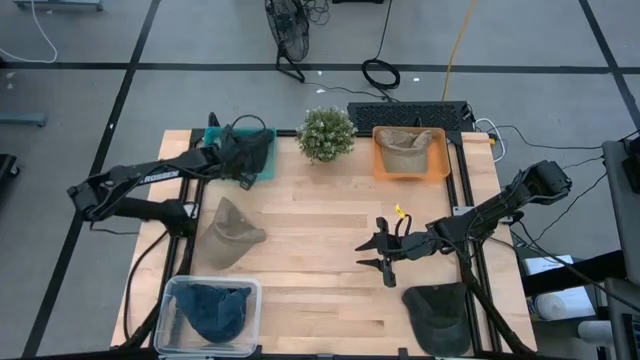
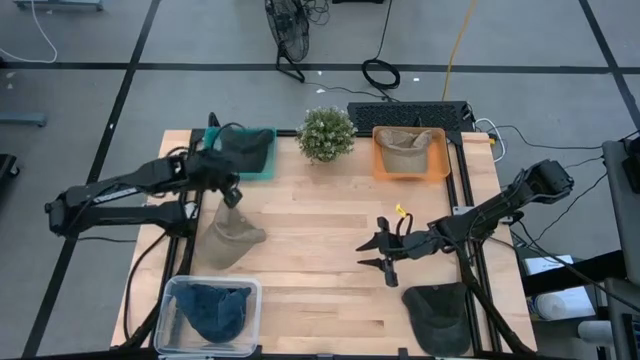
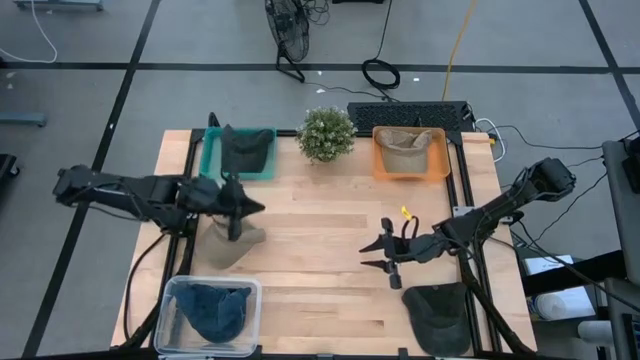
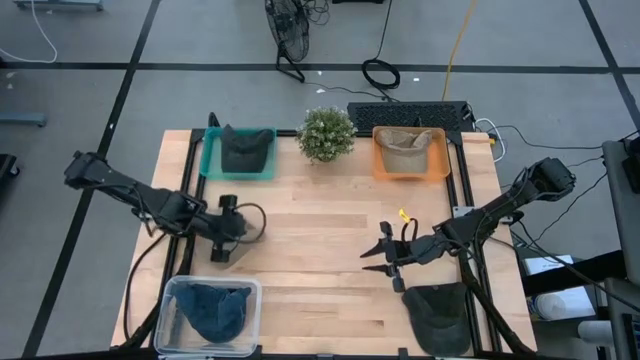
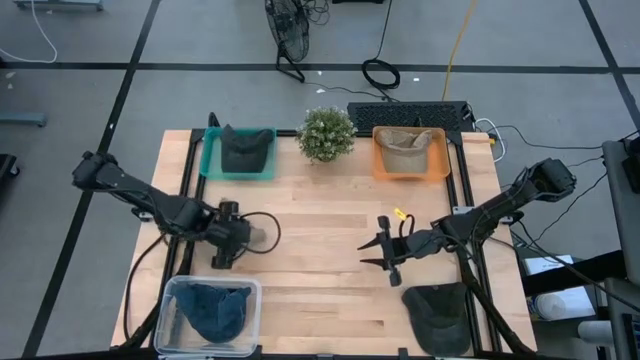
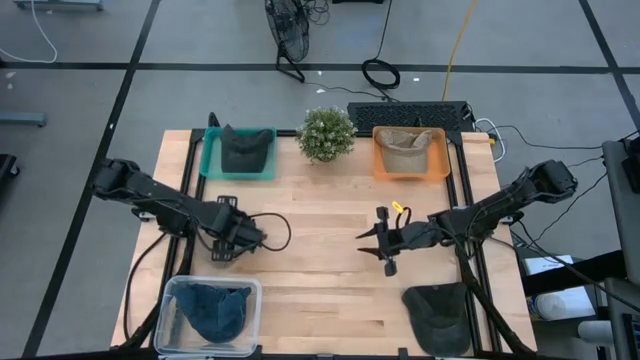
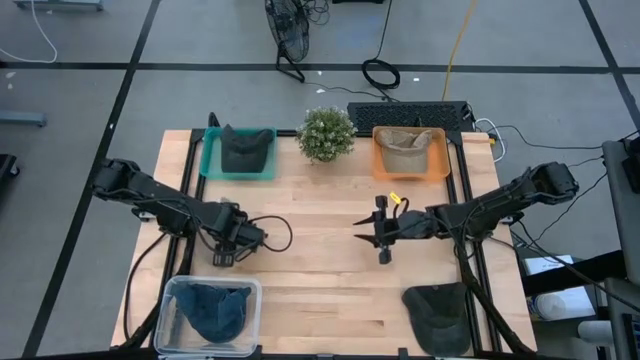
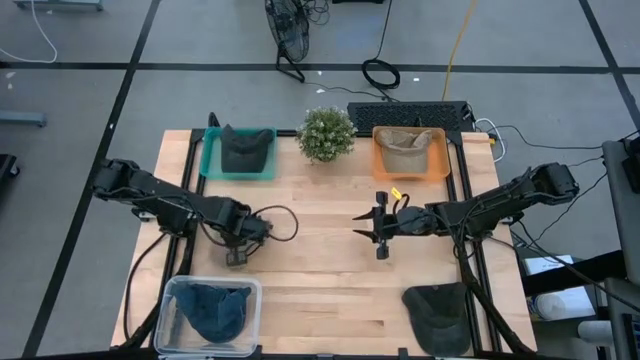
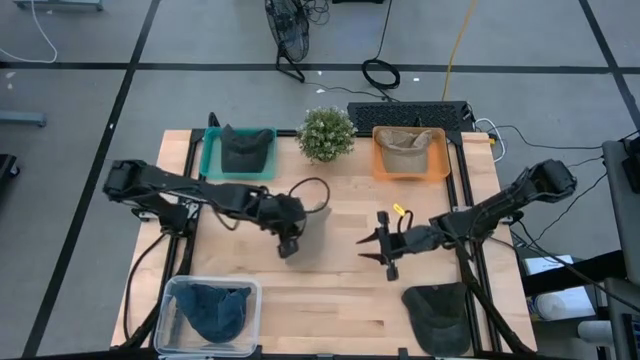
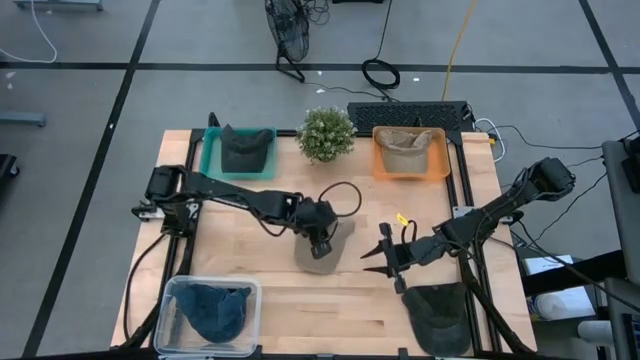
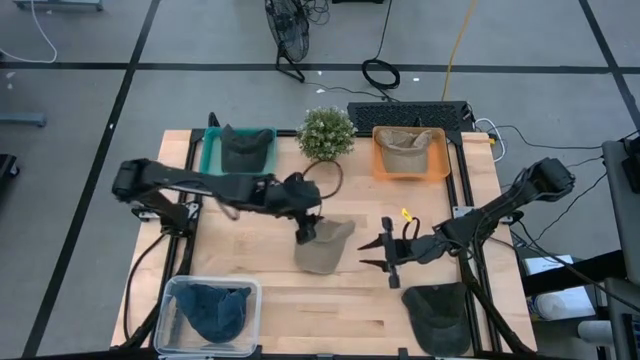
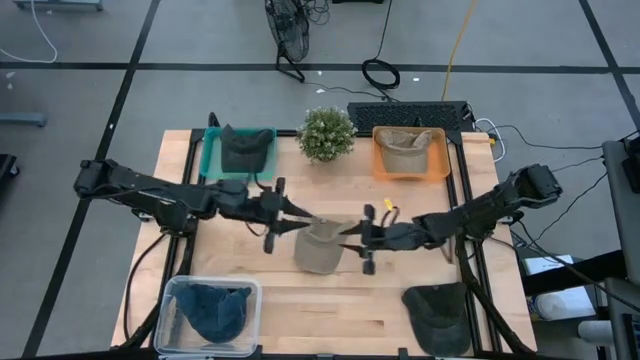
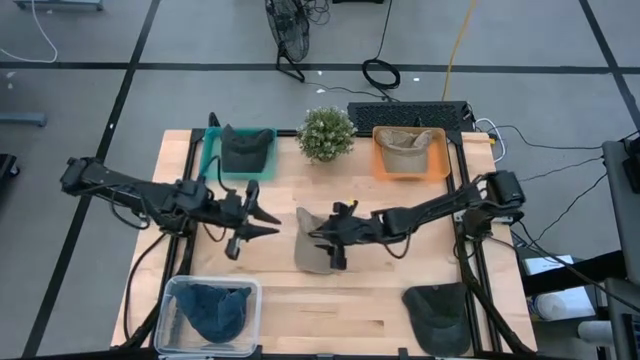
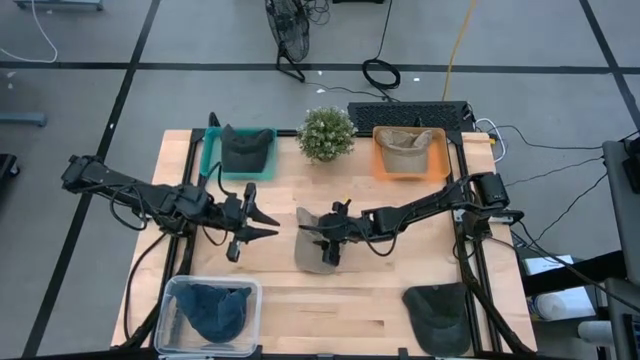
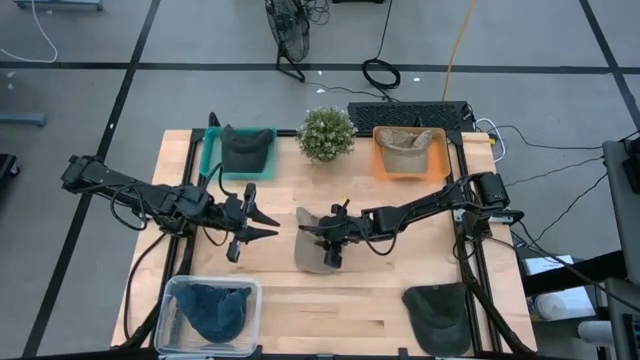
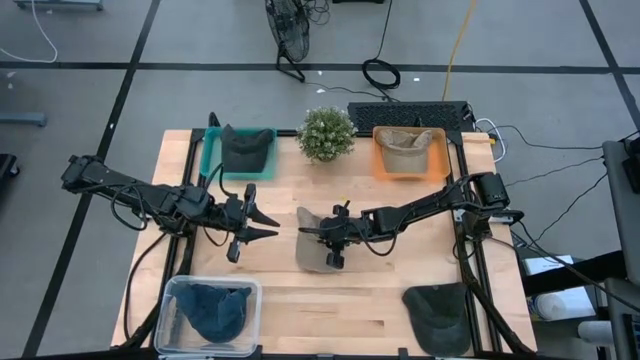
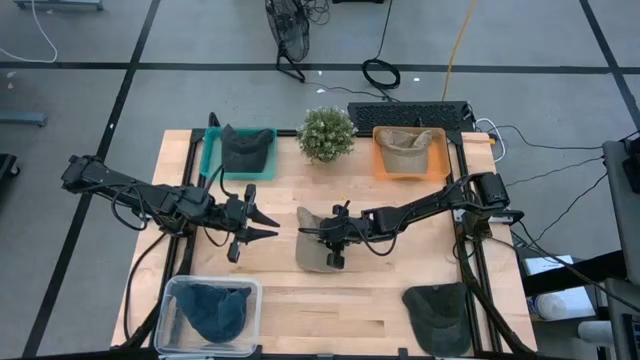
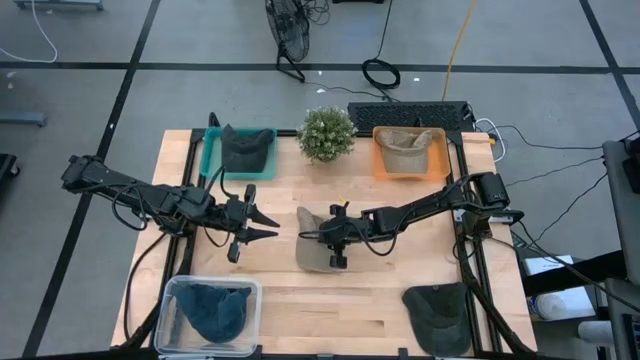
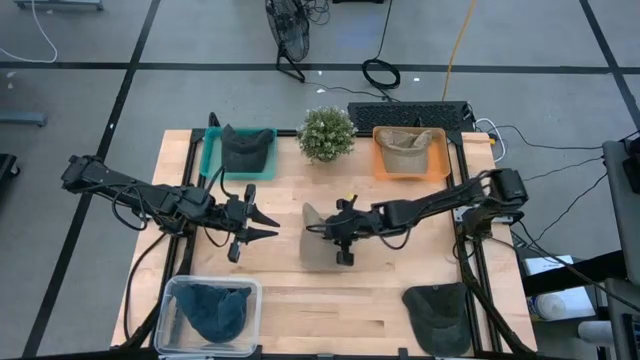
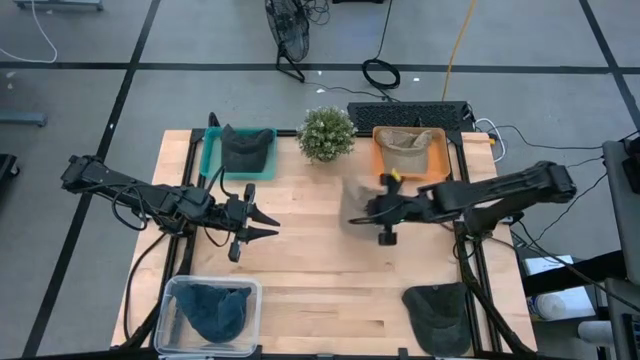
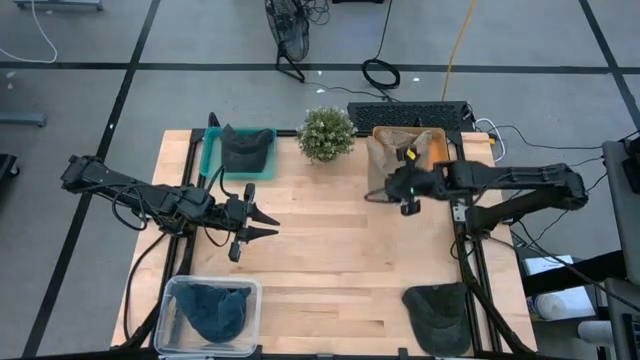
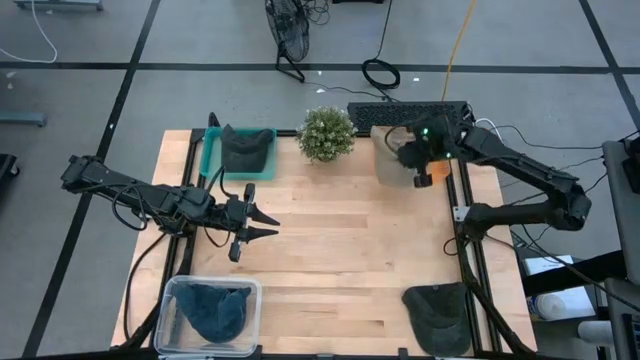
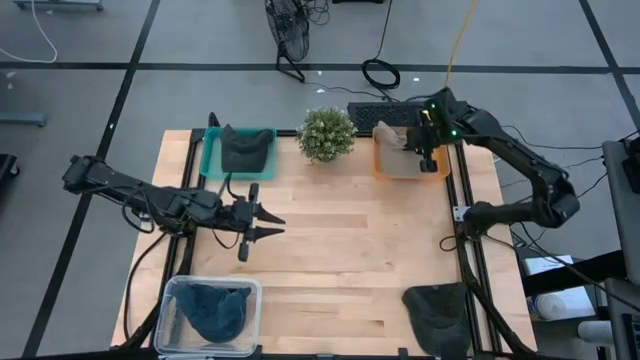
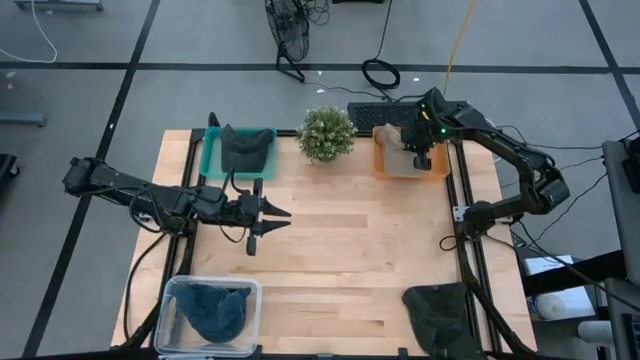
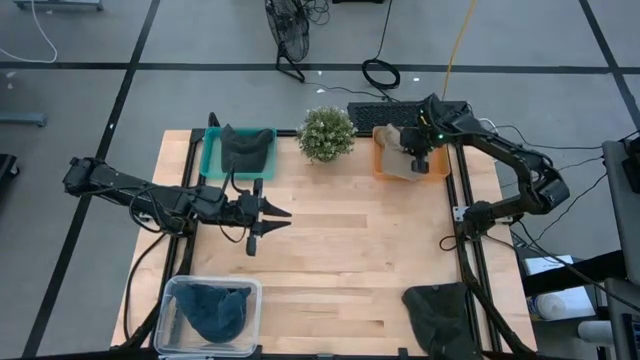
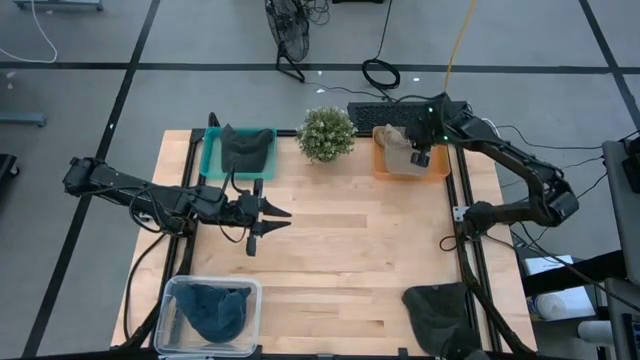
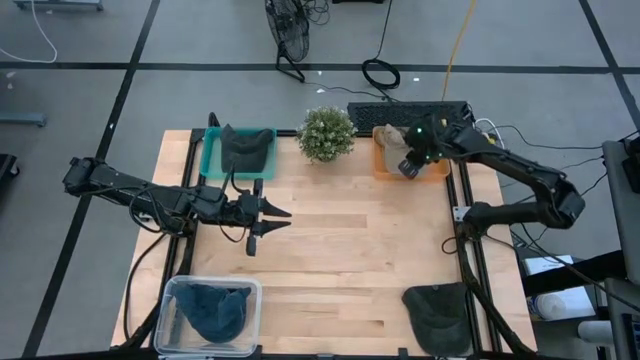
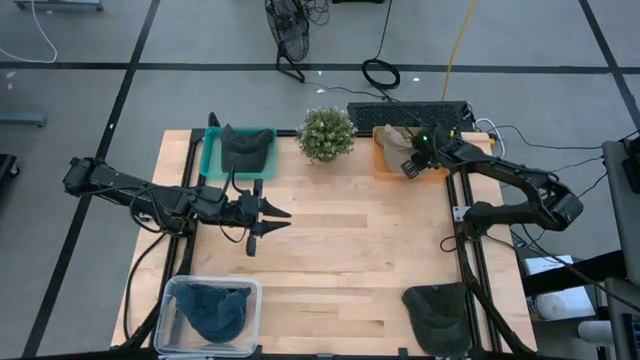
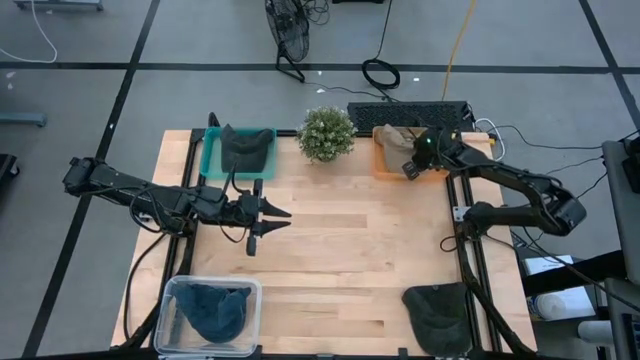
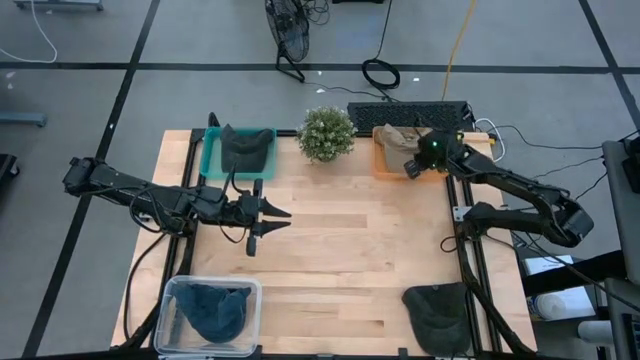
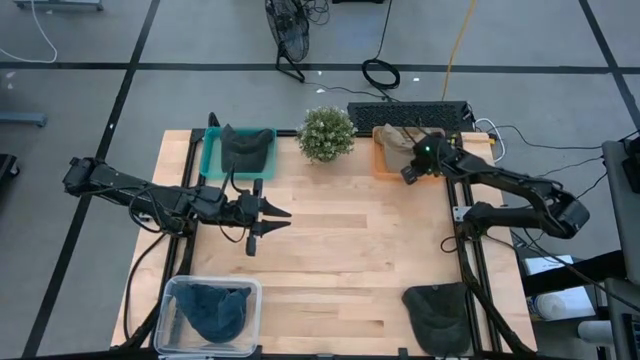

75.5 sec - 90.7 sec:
Task: Pick & Place hat
Put the brown cap into the orange bin

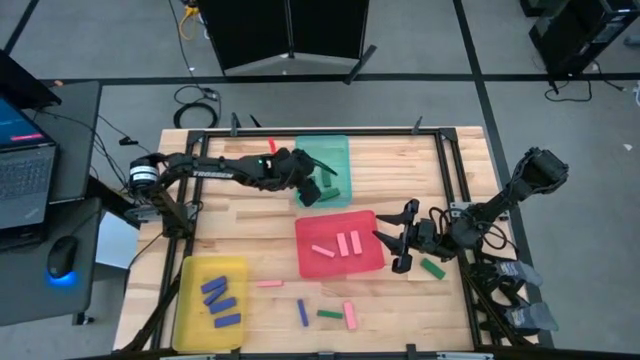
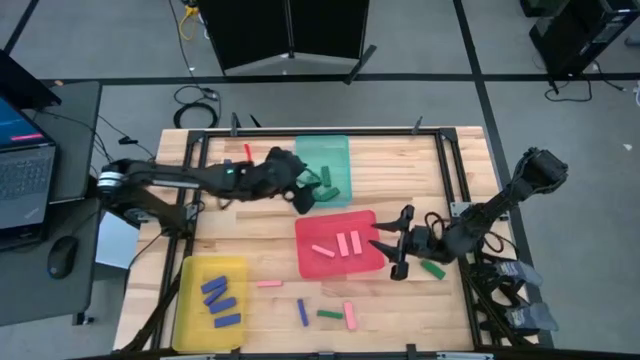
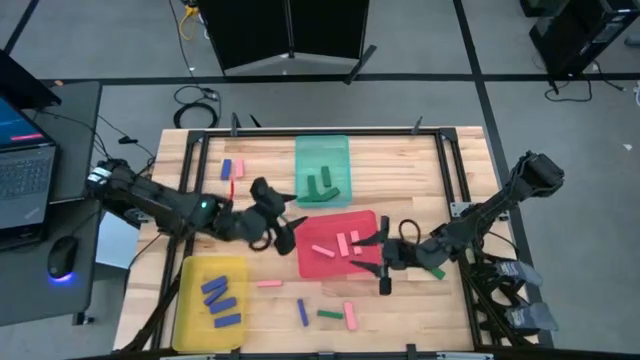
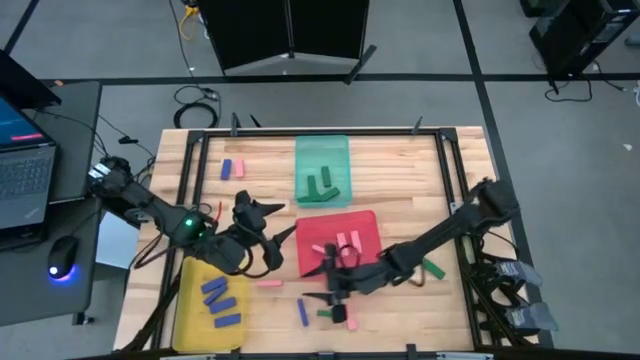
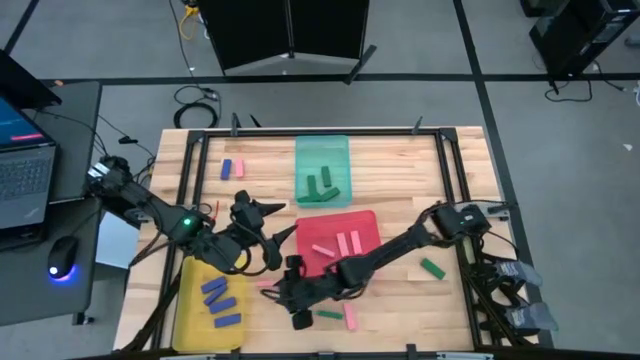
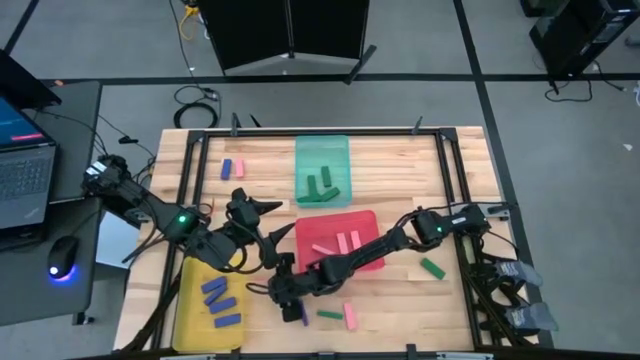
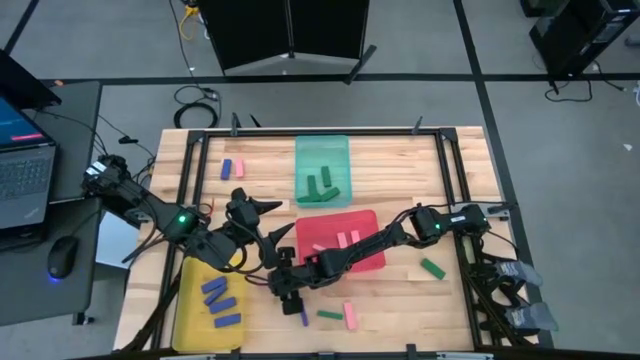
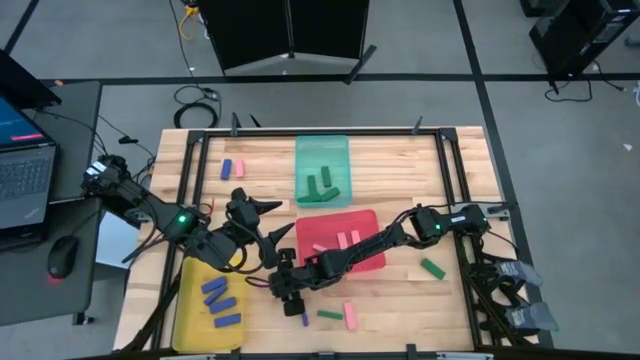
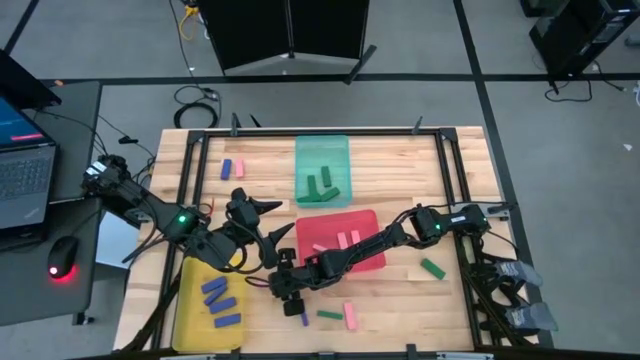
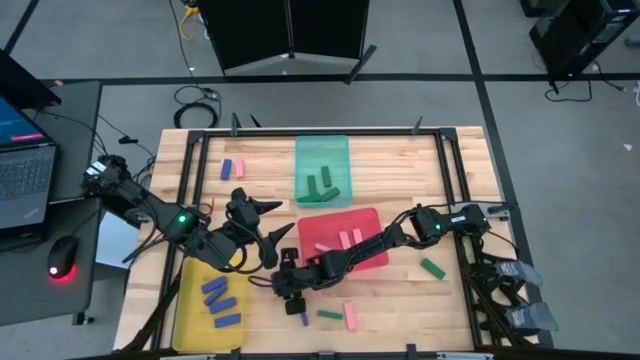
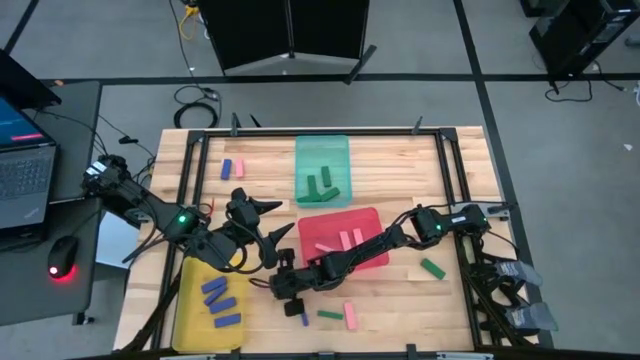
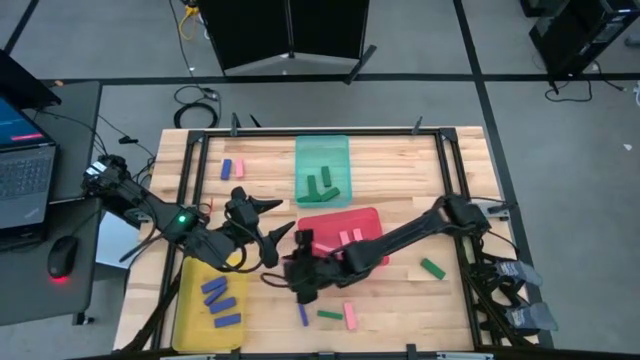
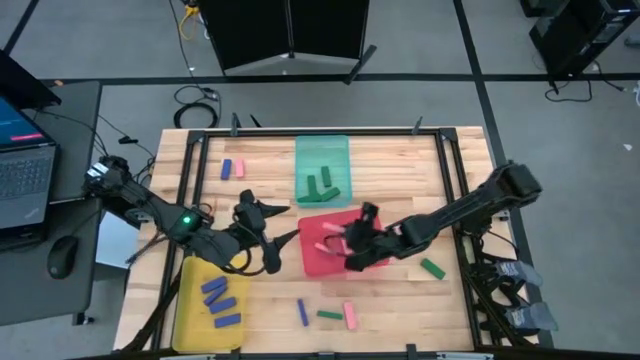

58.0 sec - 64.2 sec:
Task: Sort blocks
Put the pink block into the pink bin
